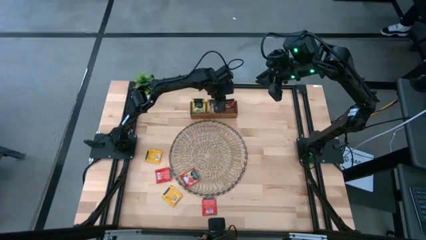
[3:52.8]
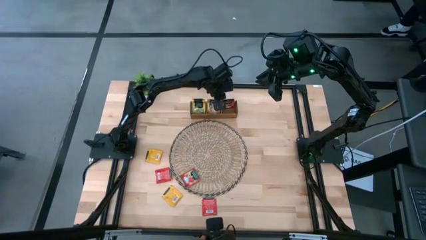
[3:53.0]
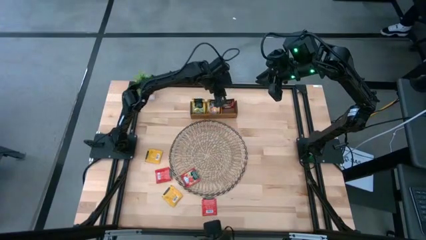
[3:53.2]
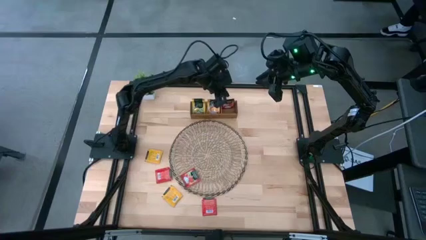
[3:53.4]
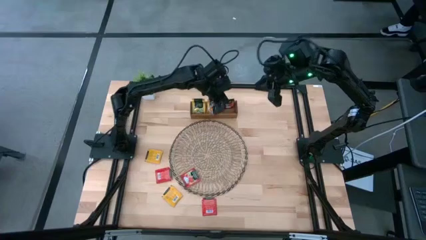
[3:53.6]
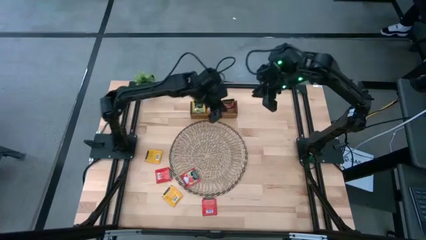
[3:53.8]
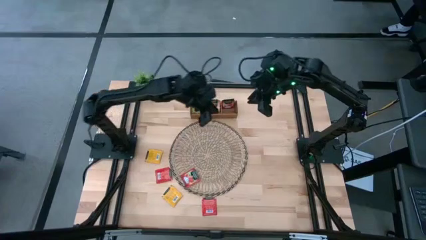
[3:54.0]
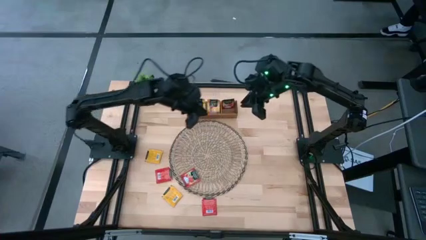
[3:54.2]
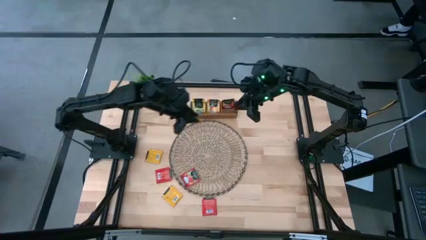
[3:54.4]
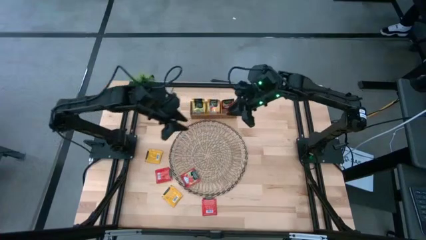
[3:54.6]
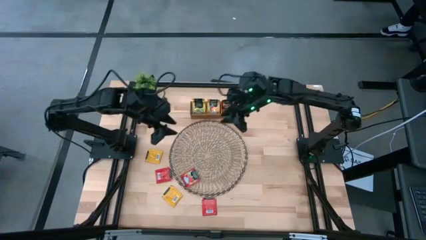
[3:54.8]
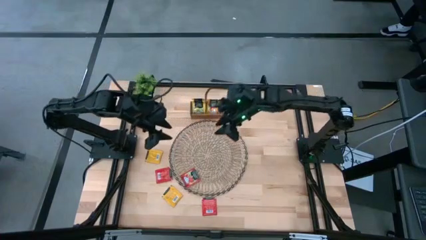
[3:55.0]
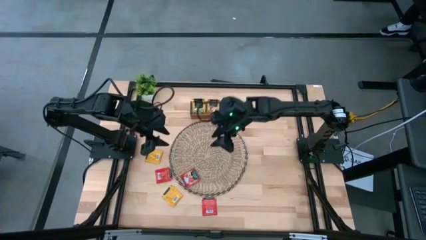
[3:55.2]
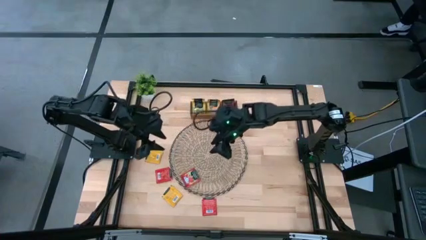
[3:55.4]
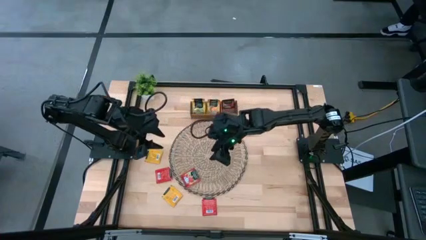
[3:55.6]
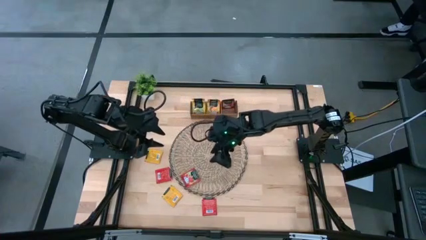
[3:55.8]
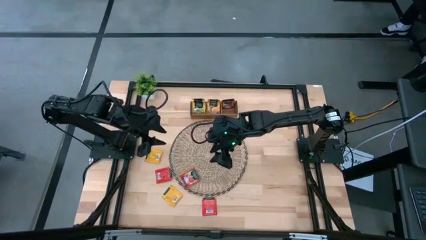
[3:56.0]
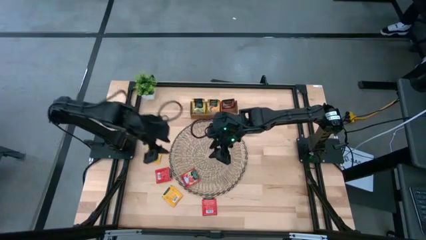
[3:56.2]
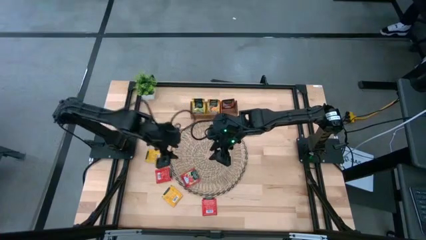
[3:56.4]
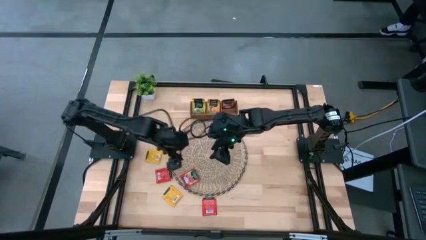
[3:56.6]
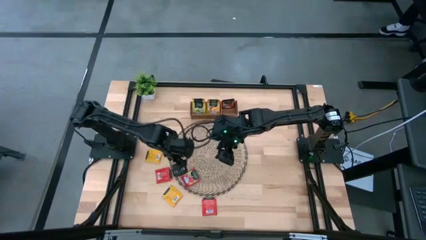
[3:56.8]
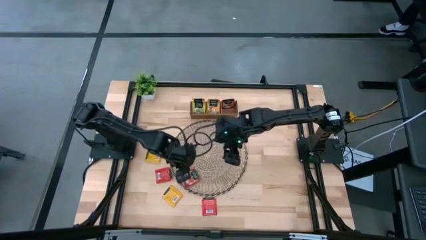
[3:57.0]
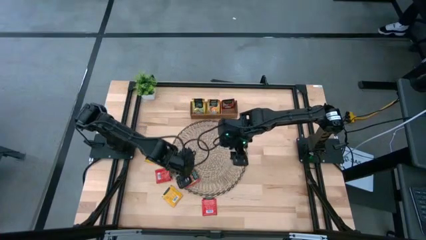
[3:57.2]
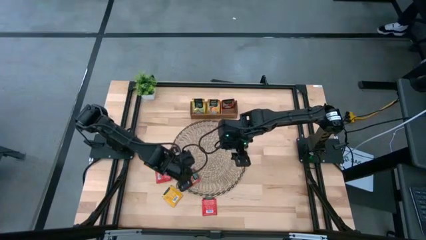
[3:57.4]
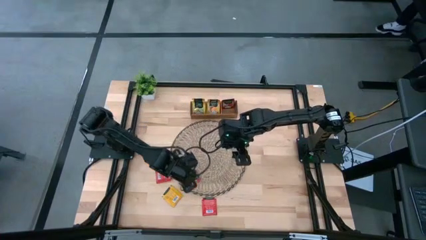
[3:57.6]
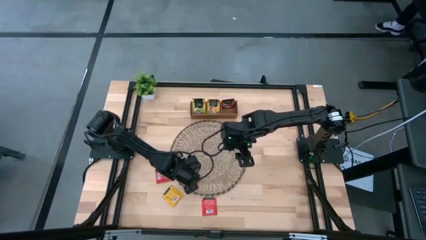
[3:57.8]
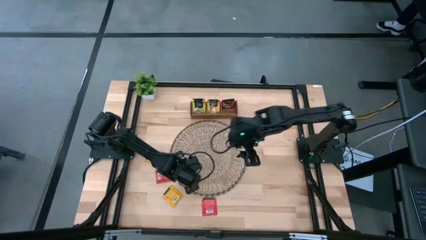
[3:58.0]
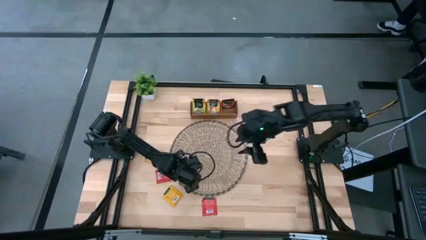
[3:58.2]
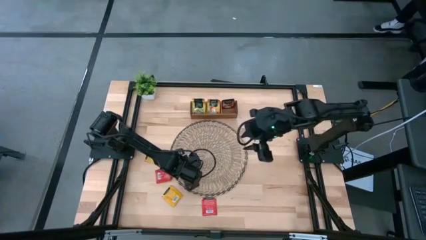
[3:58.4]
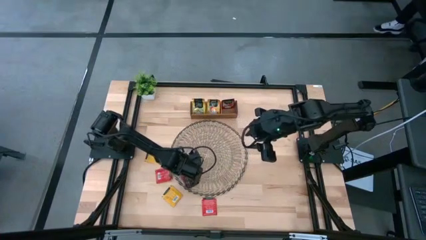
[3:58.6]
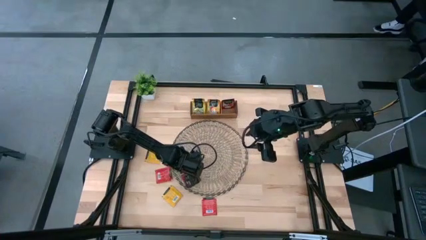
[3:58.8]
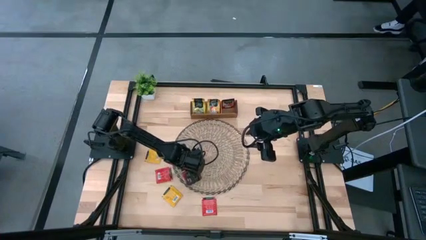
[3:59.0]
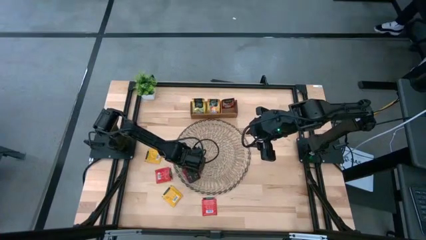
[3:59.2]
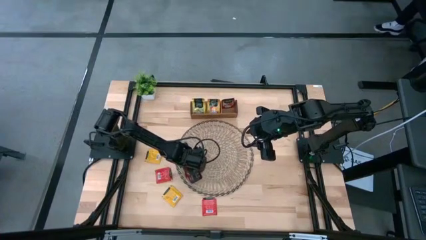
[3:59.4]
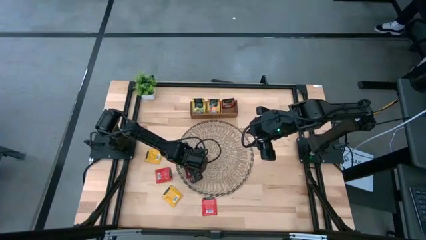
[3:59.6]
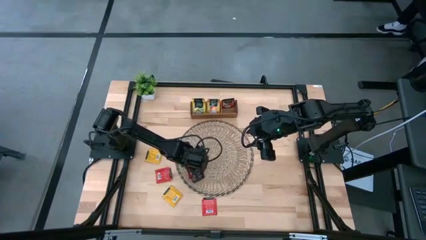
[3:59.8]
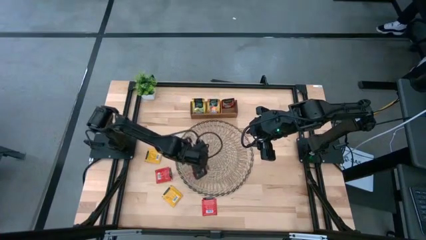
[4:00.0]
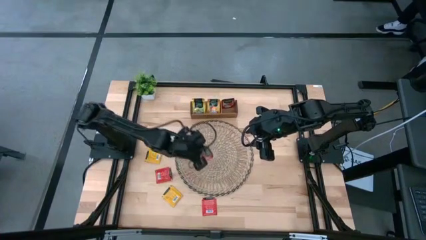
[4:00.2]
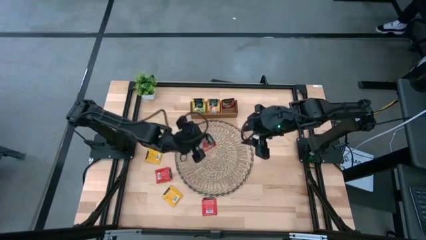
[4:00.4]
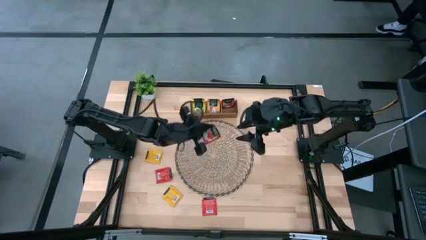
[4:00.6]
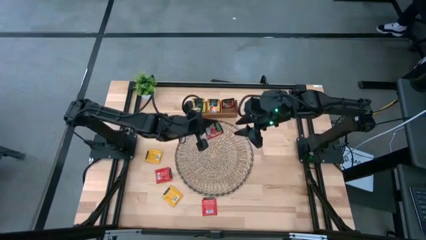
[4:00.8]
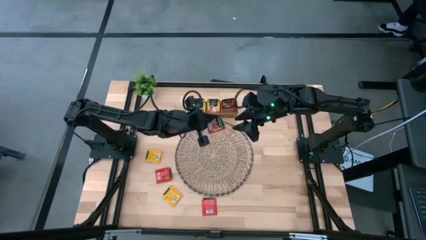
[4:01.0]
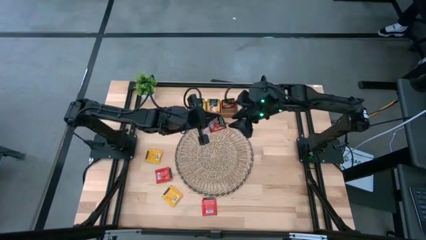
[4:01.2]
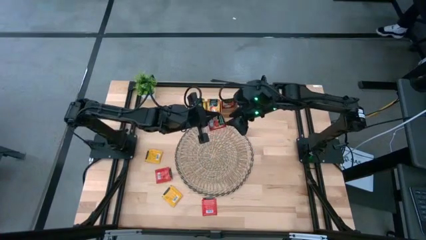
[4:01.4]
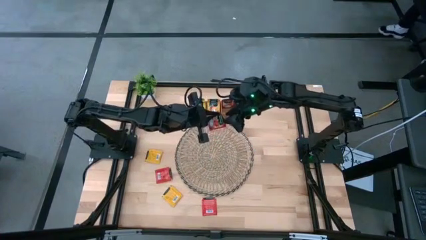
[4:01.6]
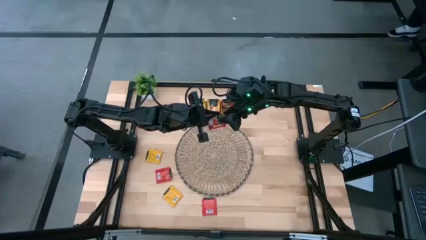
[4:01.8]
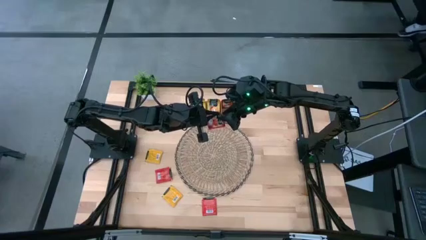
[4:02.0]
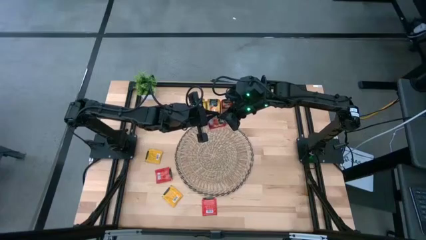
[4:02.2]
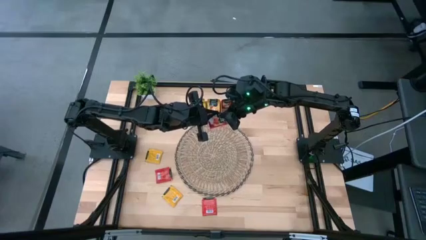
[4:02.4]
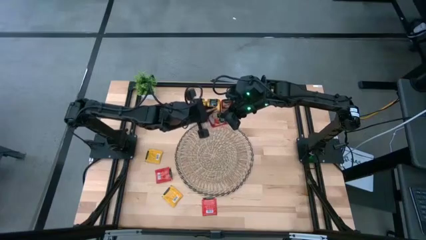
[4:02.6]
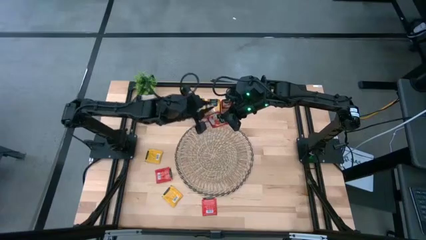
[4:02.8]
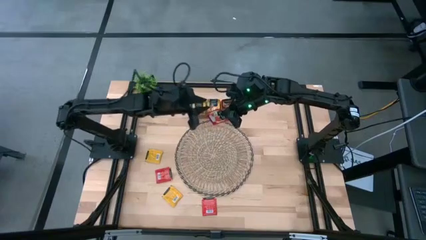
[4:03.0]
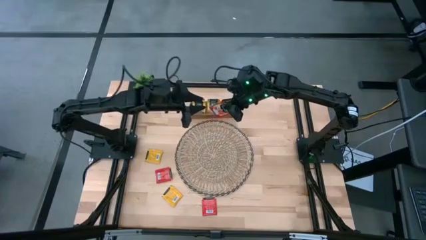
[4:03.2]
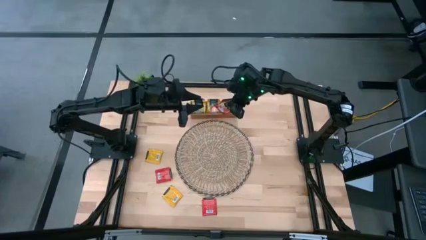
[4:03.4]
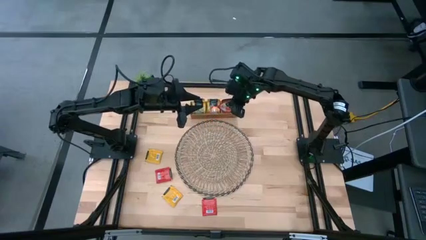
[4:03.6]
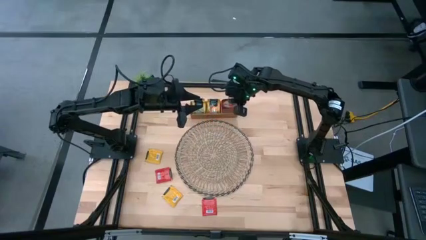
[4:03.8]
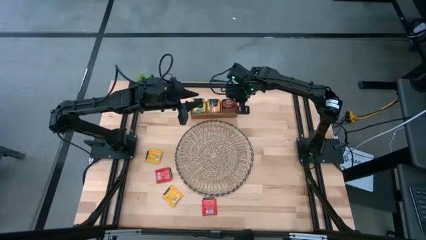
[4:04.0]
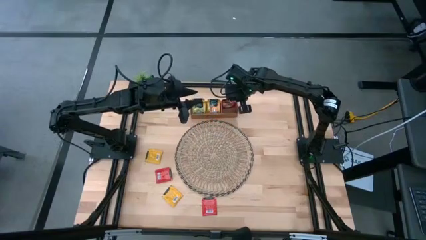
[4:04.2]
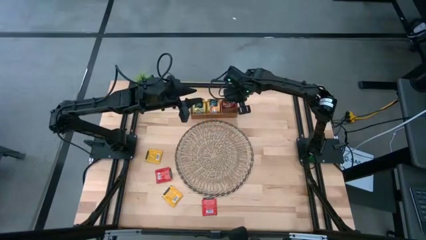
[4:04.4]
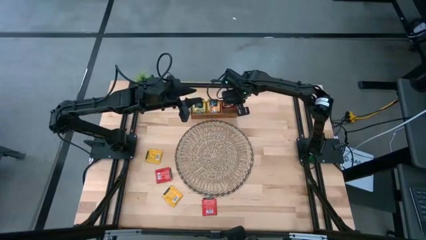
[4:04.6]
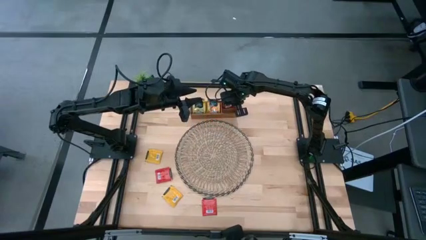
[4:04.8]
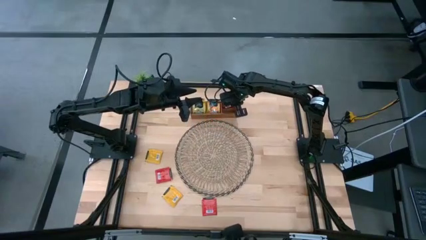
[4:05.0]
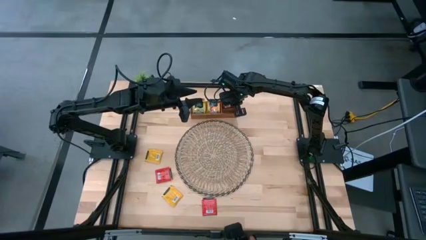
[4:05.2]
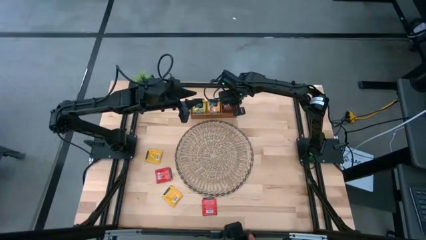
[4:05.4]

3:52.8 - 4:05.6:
Task: Pick & Place Tea
Put the right red tea bag into the right of the wooden organizer
